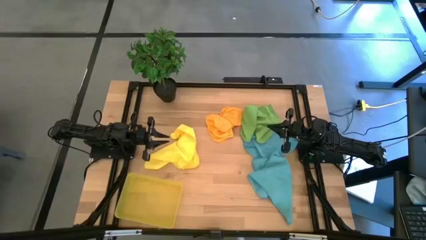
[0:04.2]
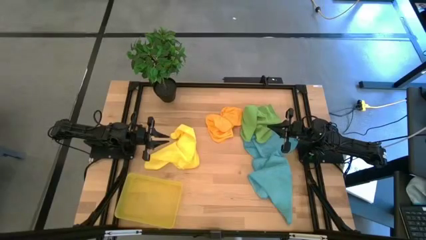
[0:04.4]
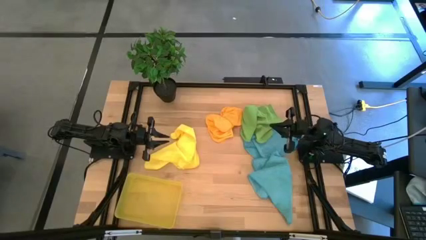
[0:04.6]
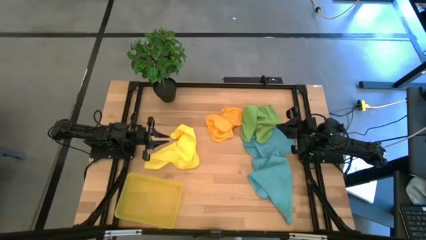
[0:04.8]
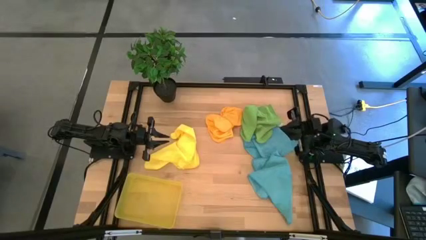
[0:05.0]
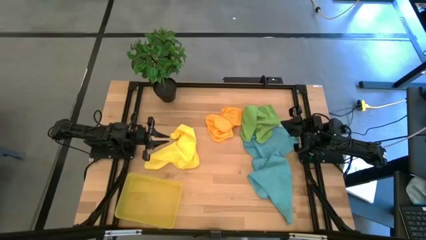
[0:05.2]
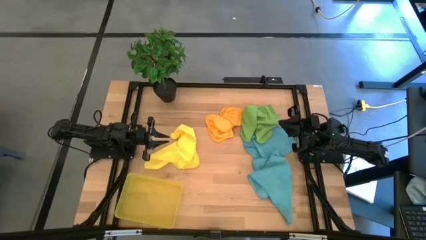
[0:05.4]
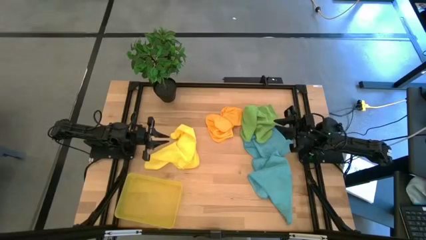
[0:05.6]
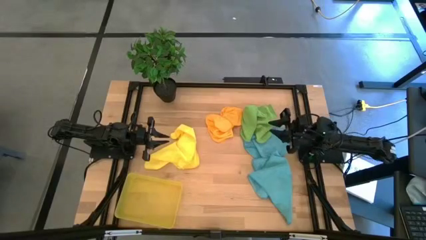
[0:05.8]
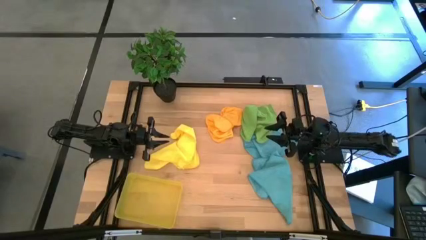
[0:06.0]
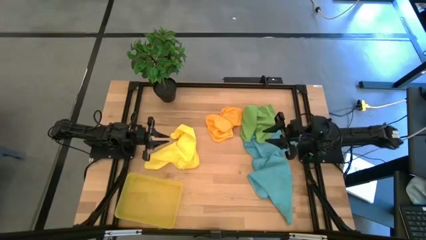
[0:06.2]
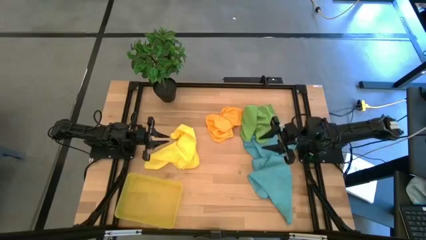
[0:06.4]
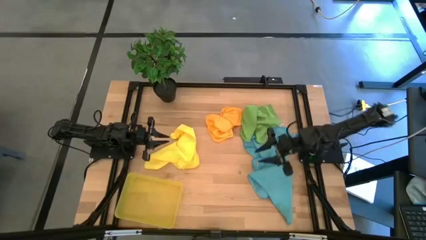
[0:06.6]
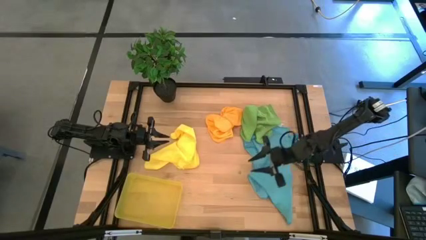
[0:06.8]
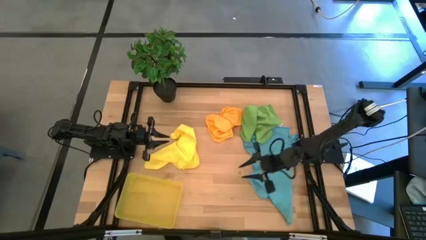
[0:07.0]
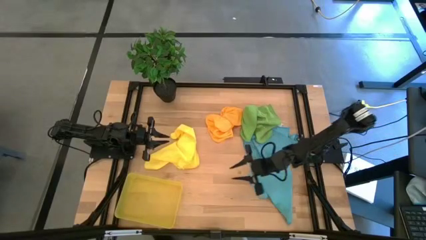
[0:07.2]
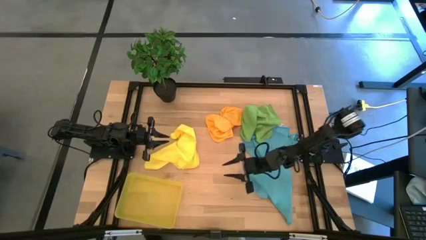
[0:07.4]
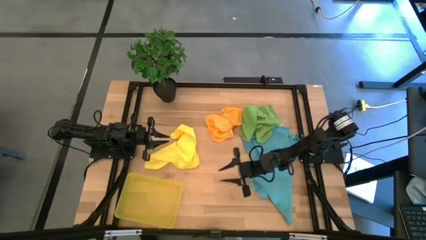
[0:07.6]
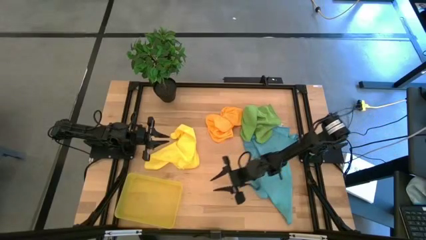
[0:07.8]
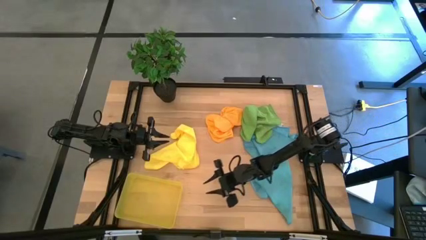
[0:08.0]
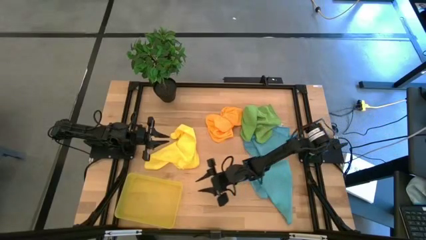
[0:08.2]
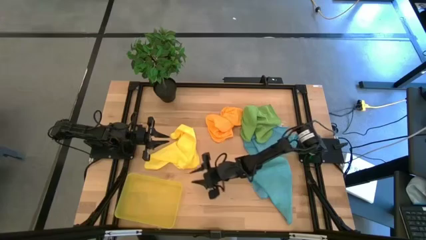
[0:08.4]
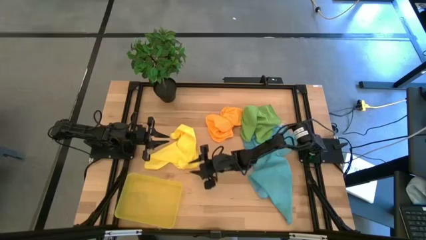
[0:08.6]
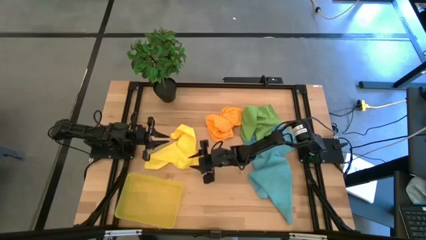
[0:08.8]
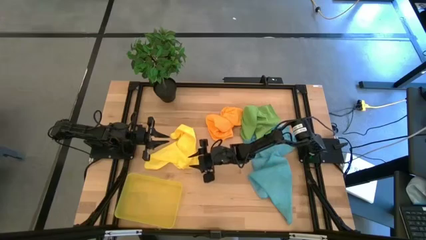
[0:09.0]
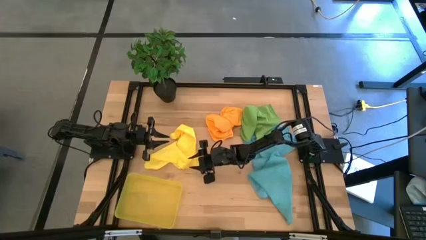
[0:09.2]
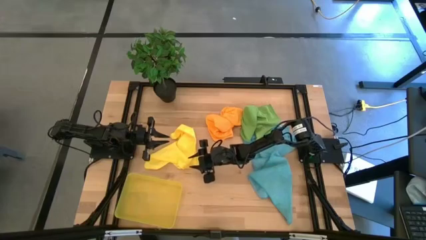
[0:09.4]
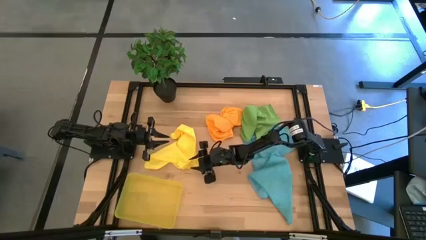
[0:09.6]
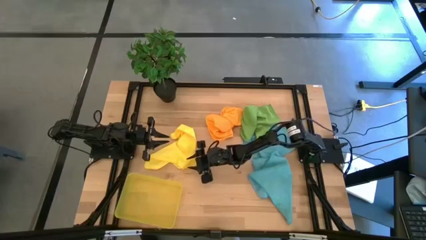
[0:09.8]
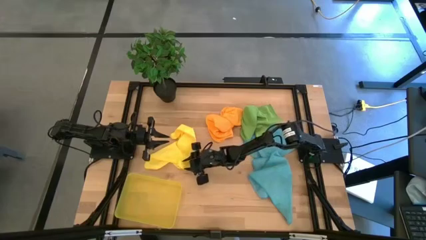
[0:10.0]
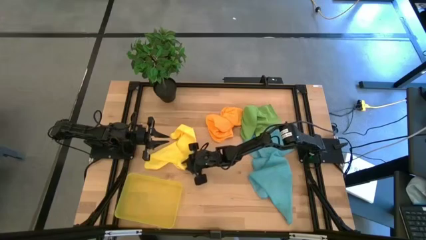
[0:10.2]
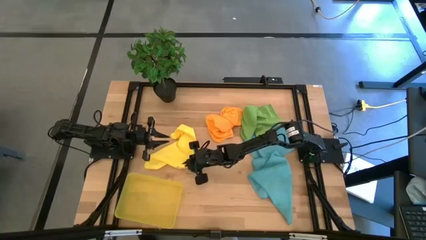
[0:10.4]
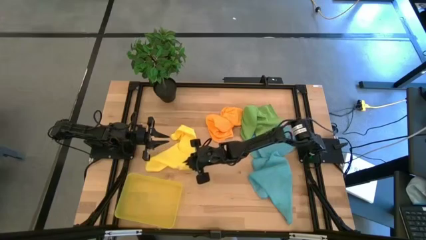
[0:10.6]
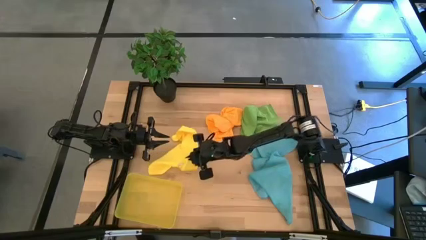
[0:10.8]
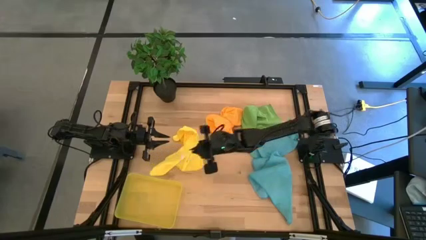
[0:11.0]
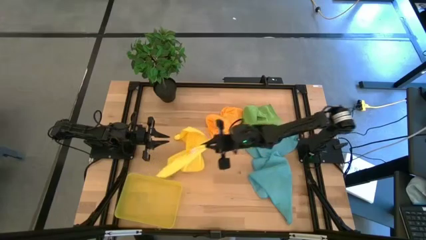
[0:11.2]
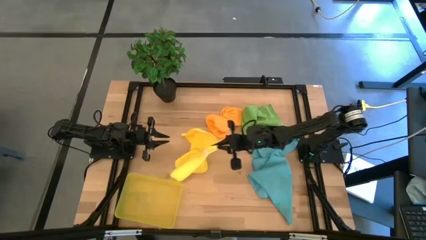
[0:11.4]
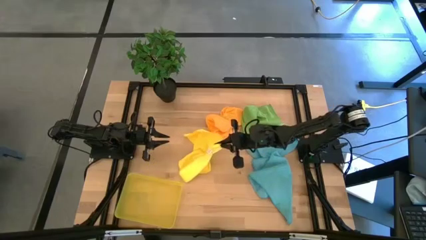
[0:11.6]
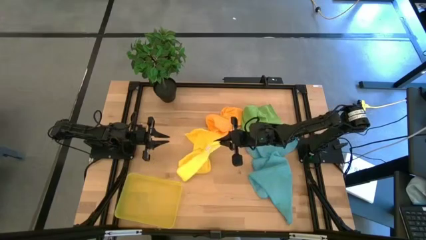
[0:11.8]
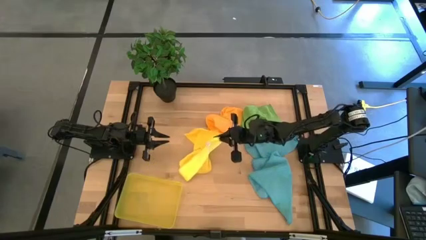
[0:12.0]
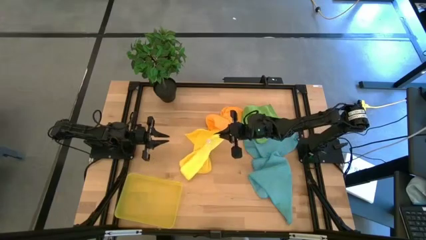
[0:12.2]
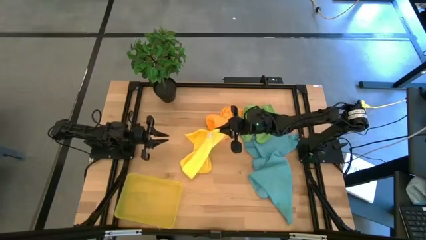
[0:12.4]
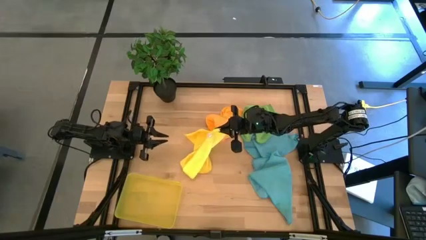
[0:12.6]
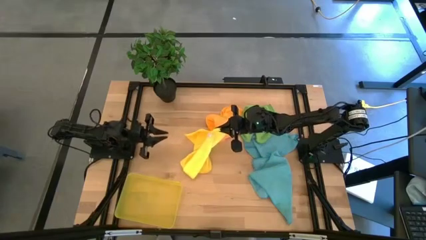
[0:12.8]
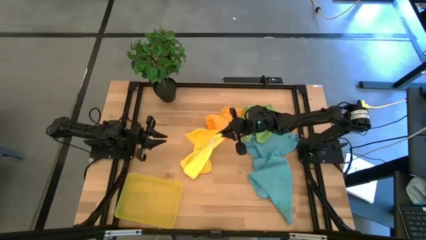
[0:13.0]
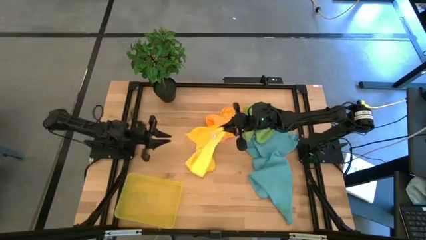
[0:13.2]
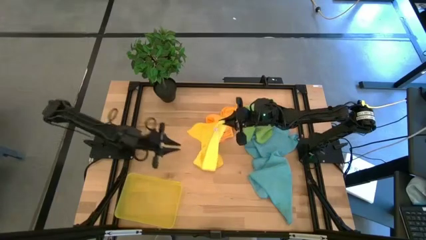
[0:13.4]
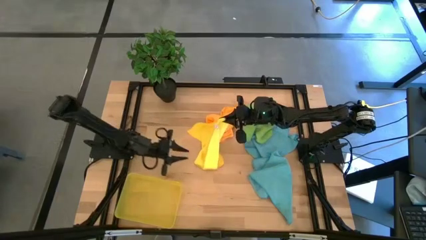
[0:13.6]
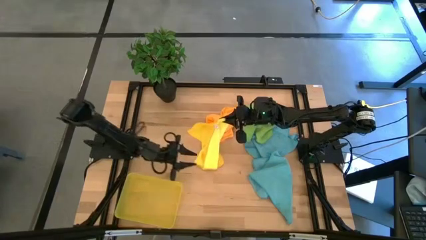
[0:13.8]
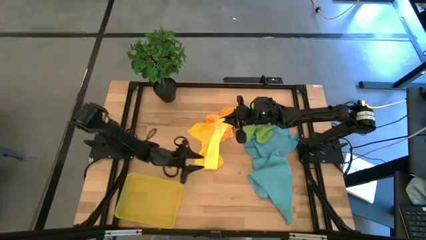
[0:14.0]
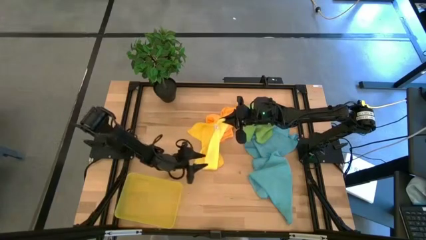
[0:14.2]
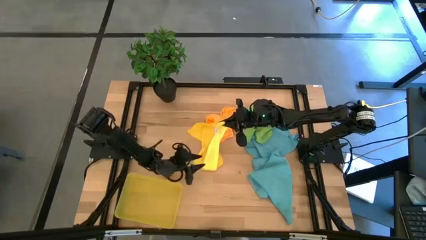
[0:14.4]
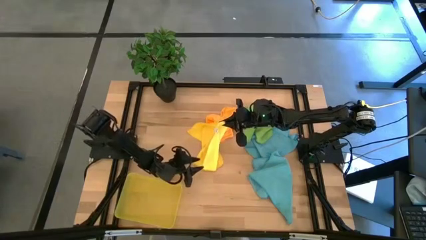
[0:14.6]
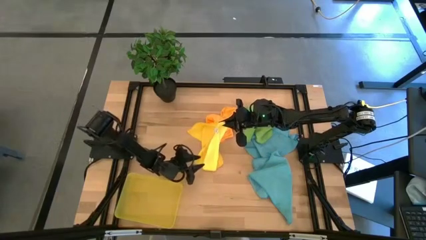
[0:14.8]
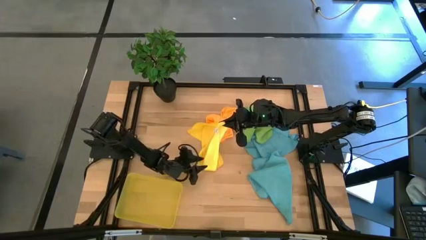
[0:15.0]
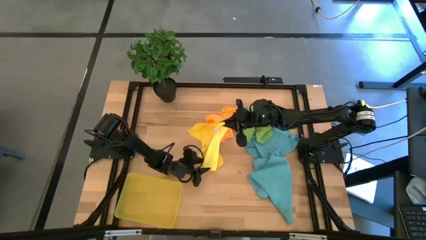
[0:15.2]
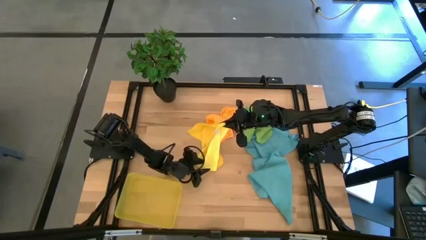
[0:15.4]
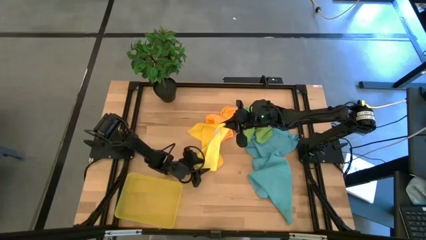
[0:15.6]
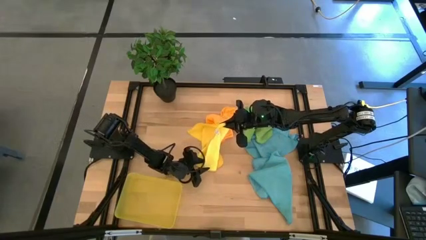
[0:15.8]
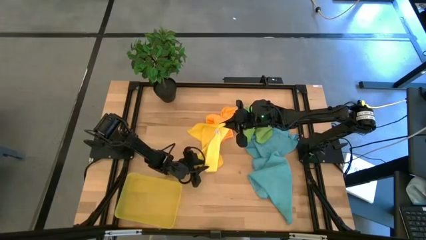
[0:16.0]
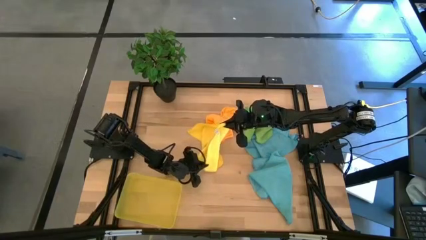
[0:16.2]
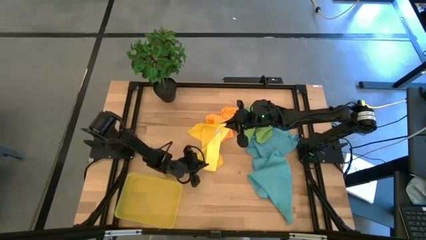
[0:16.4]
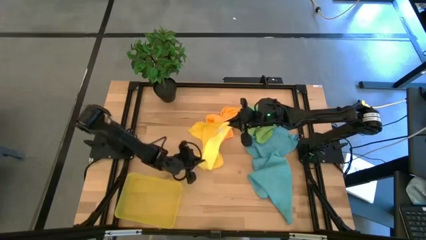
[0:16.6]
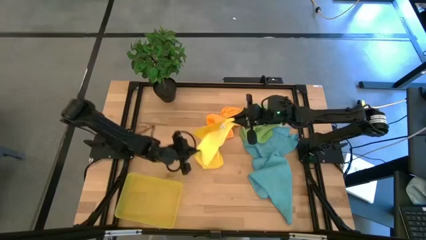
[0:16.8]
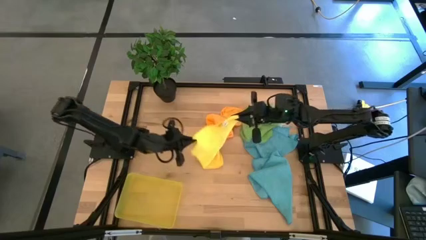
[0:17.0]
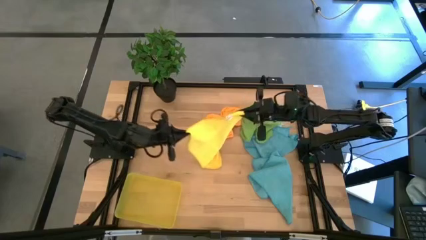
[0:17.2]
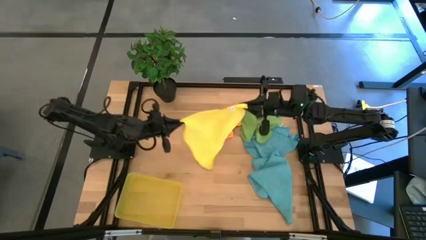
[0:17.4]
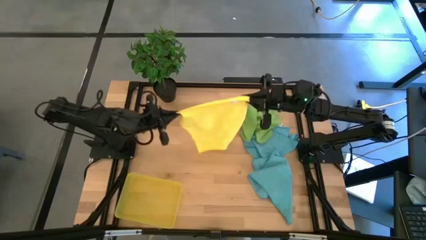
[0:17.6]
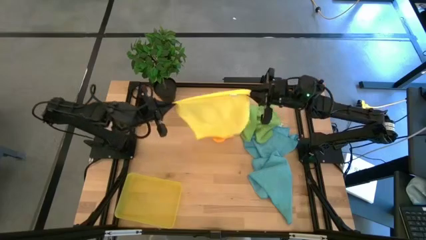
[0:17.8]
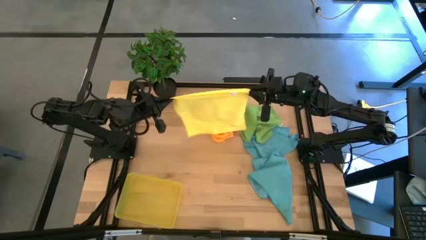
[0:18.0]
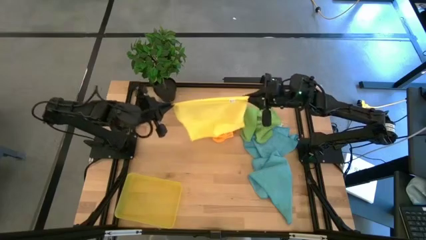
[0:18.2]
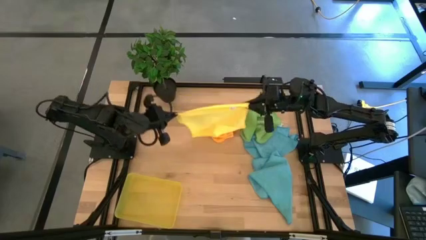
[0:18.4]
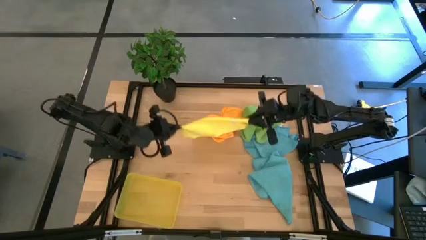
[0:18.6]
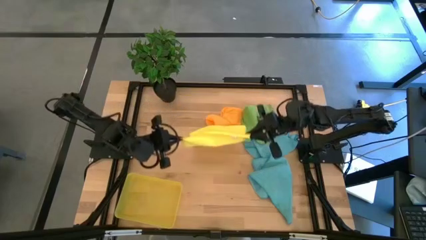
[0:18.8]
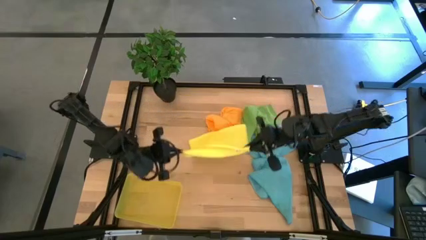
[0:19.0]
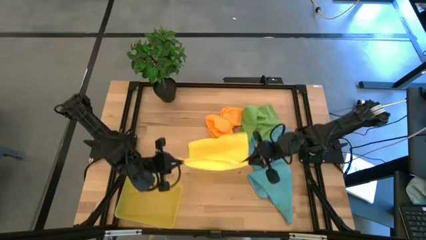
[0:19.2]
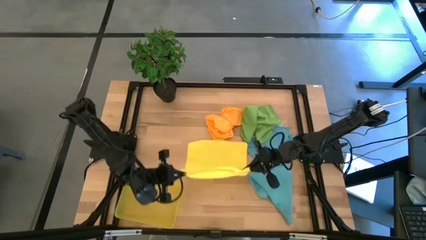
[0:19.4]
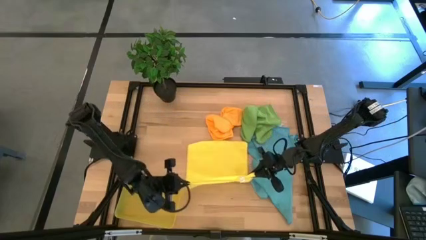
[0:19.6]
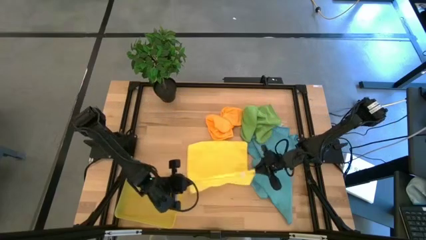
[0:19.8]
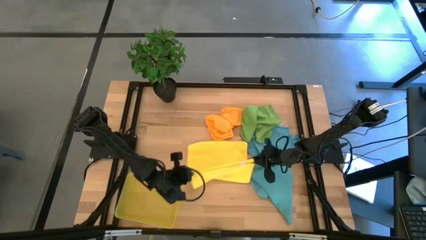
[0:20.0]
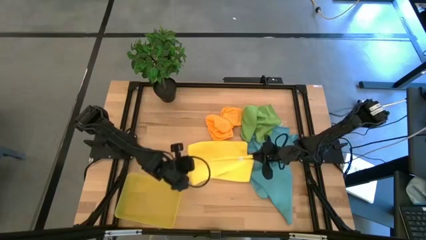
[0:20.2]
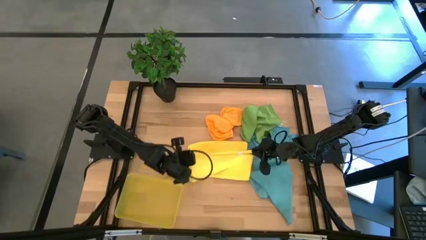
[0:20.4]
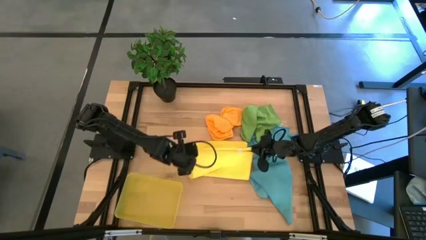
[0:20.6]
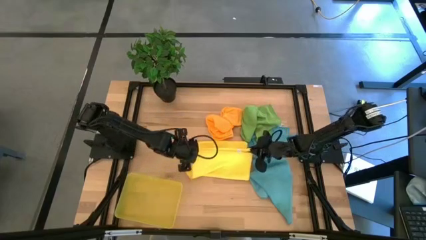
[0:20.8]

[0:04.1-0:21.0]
Task: Fold microfiber towels
Fold the yellow microfiber cloth
